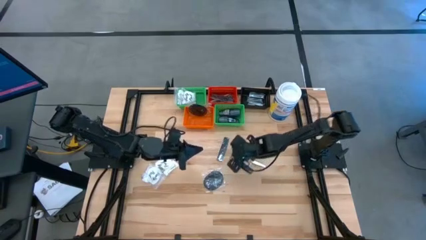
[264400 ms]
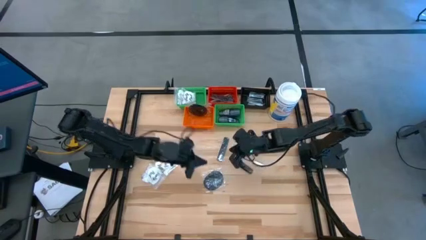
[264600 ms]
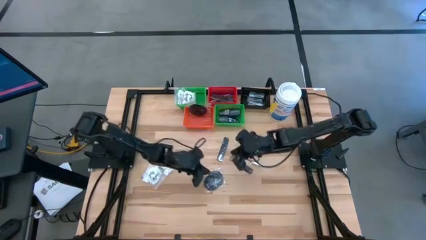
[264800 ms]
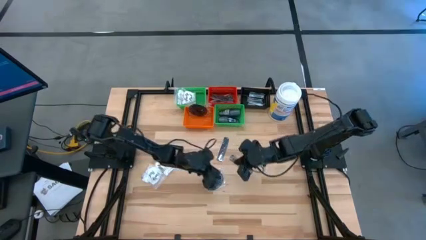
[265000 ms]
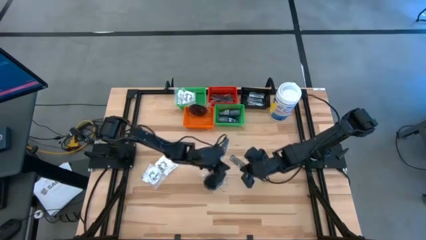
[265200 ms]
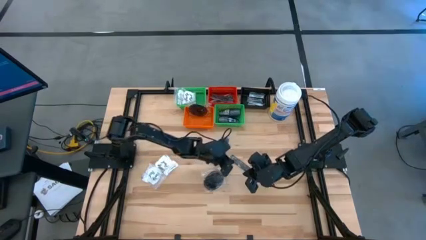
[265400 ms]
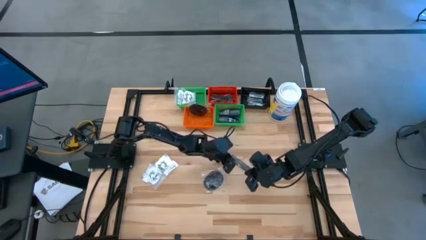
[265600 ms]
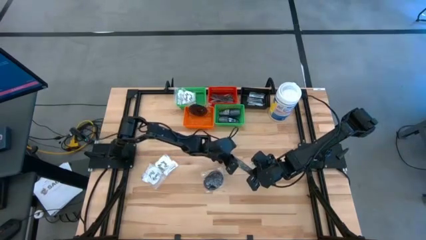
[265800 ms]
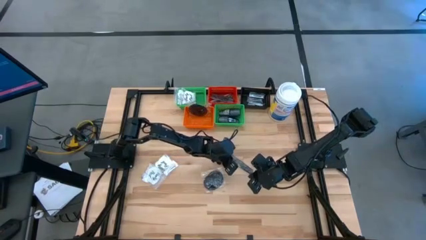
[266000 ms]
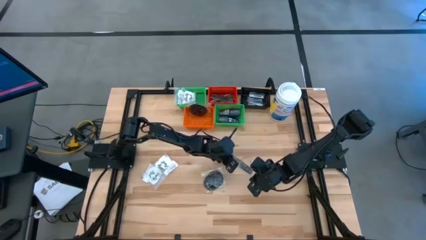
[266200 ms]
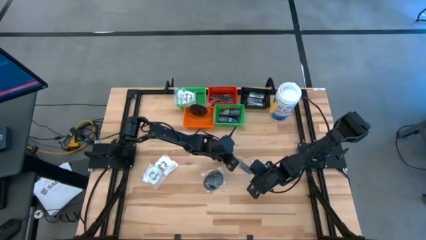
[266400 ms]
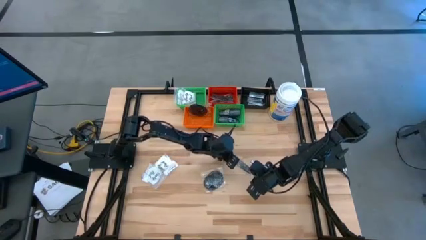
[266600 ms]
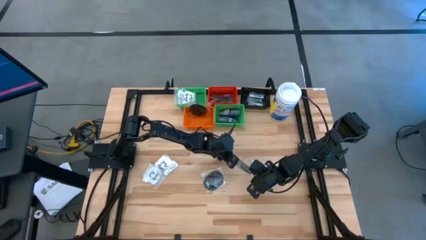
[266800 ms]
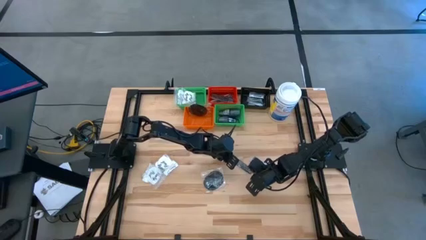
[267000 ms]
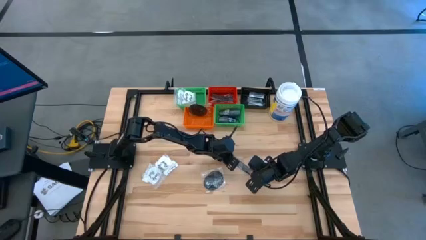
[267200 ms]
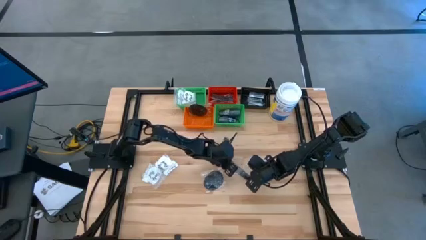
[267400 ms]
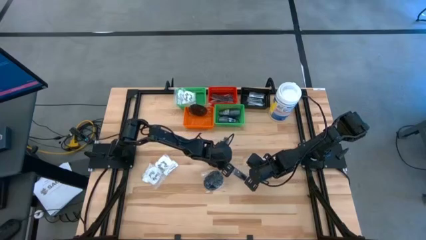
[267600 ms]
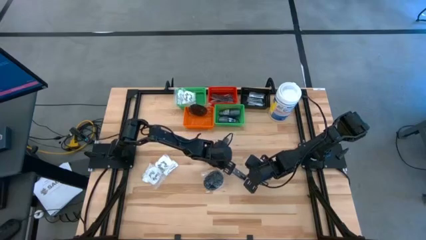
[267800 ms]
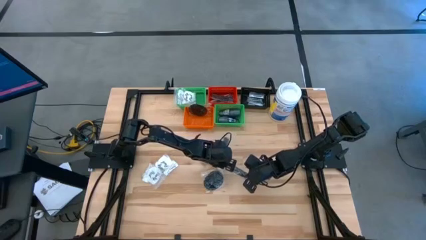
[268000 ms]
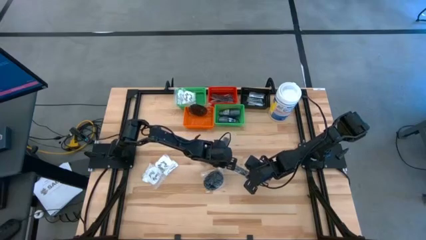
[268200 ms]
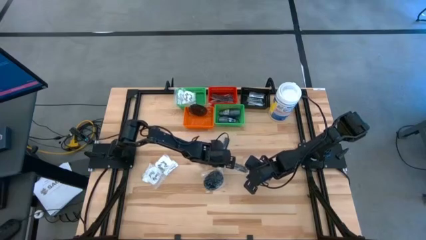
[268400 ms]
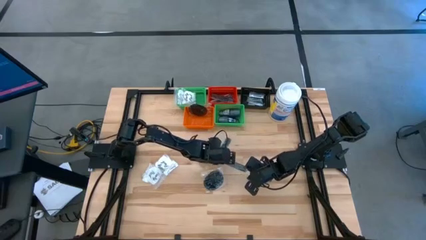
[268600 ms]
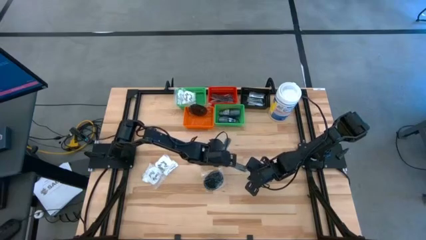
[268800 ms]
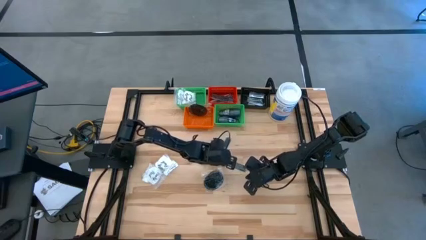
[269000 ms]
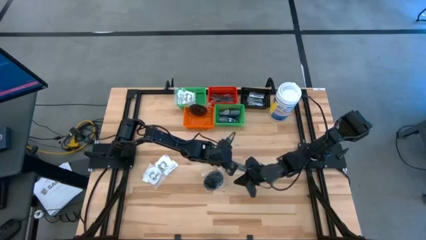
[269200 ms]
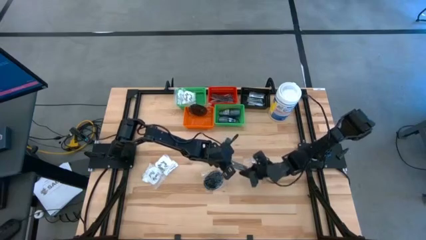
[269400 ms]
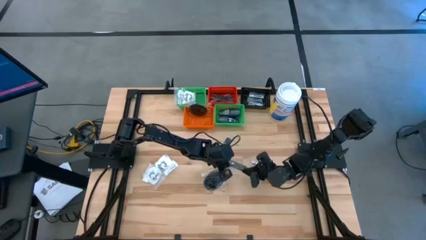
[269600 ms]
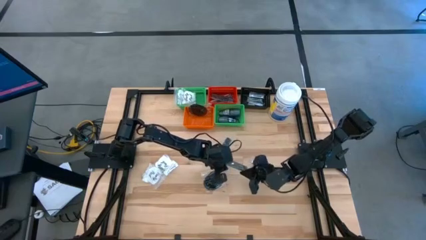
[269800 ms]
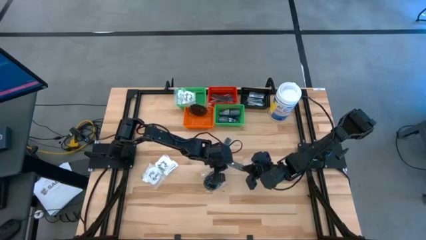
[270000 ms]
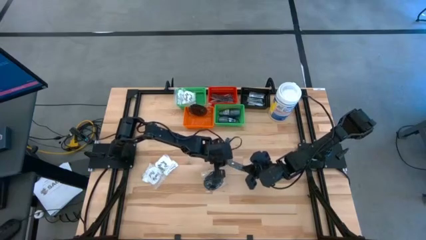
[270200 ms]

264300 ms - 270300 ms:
Task: Pick & Place Travel size toiletries
Adjust the black comb

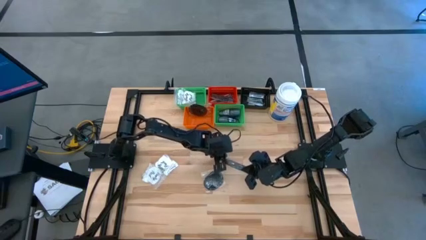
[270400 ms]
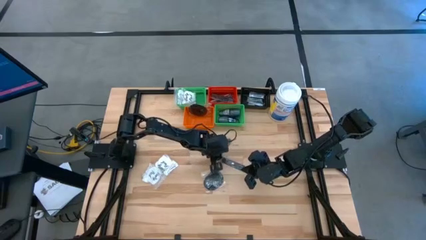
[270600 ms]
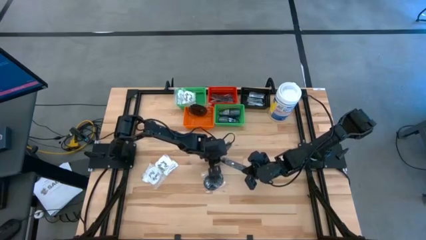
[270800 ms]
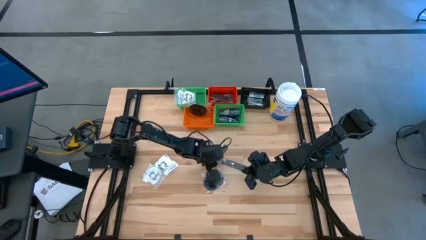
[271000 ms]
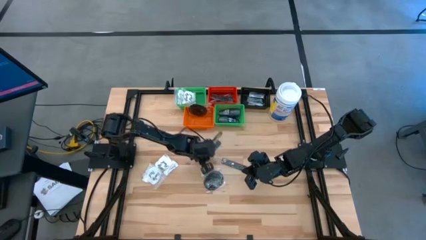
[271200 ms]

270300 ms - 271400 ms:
Adjust the black comb

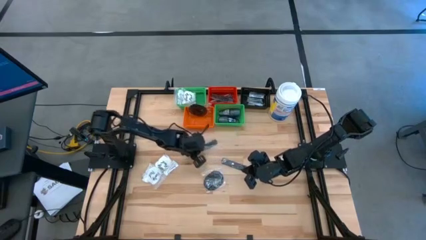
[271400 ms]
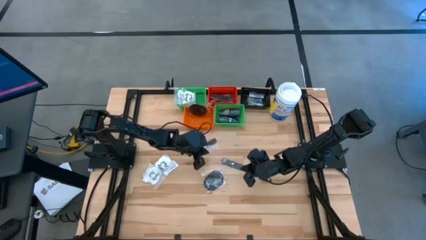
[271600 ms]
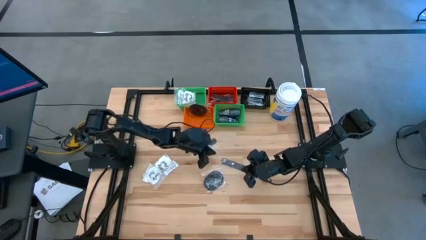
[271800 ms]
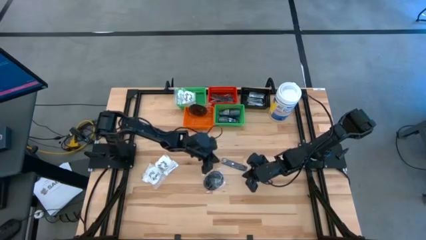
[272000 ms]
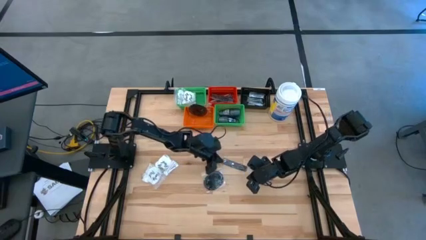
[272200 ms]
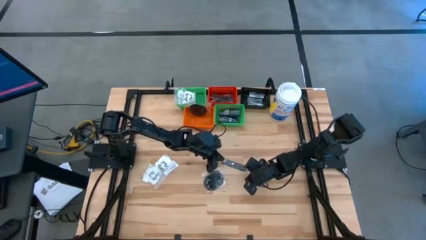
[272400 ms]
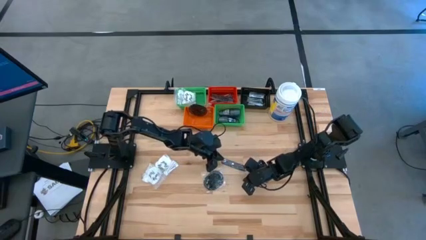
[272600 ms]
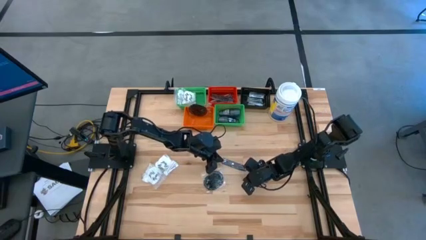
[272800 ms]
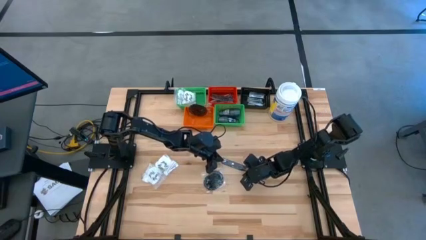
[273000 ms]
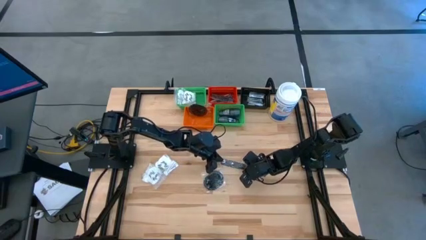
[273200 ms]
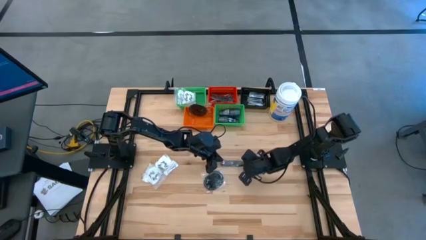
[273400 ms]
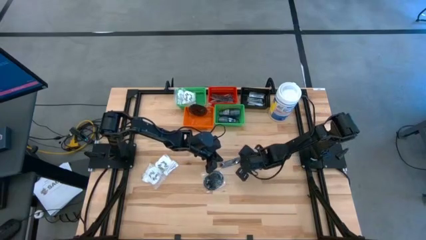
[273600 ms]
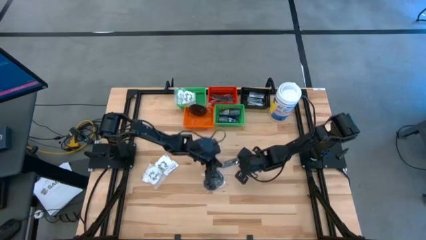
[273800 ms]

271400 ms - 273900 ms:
Adjust the black comb

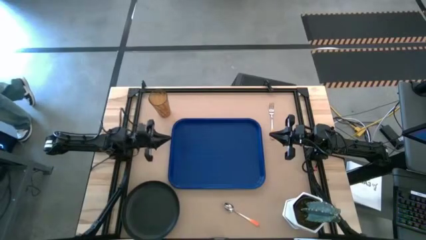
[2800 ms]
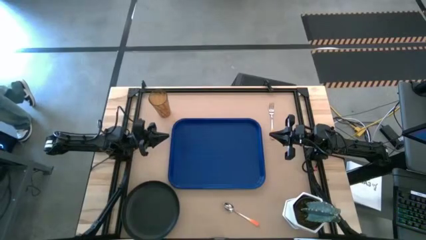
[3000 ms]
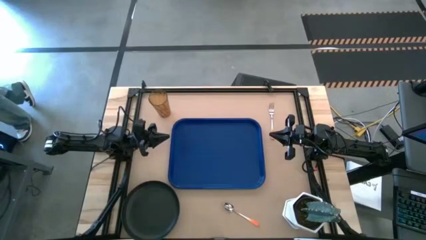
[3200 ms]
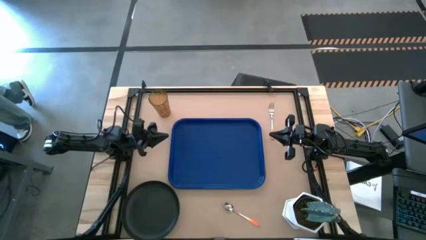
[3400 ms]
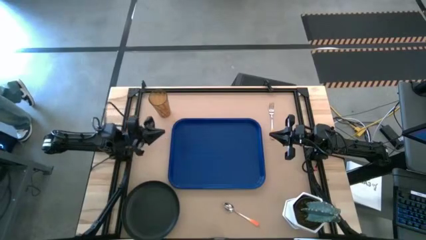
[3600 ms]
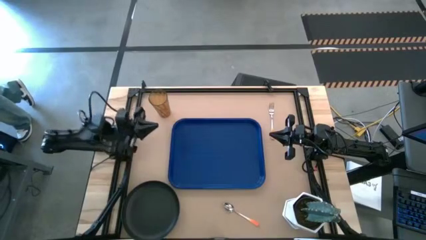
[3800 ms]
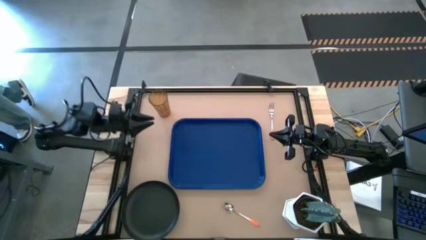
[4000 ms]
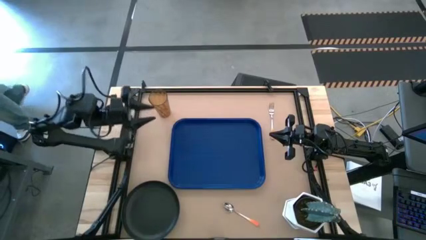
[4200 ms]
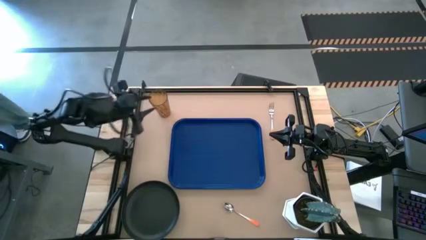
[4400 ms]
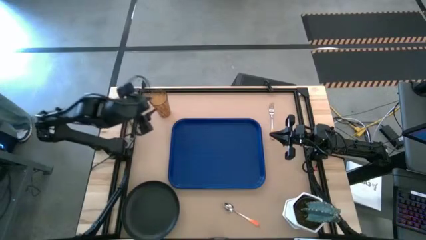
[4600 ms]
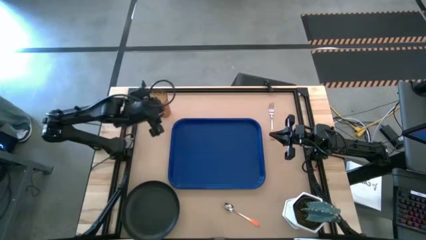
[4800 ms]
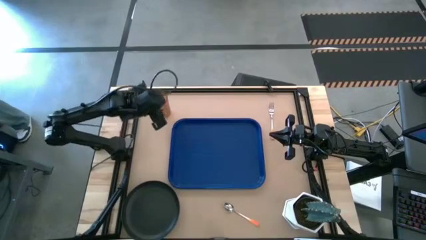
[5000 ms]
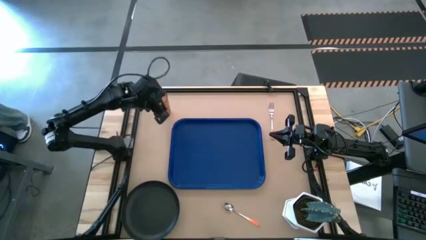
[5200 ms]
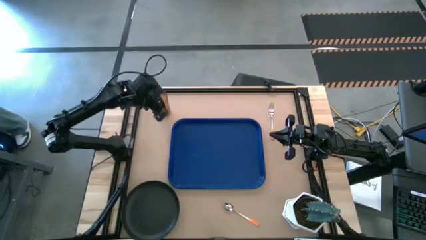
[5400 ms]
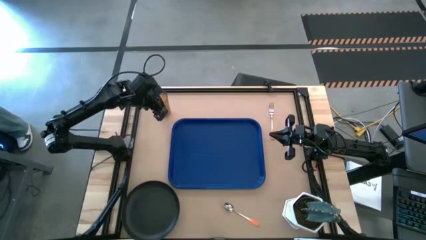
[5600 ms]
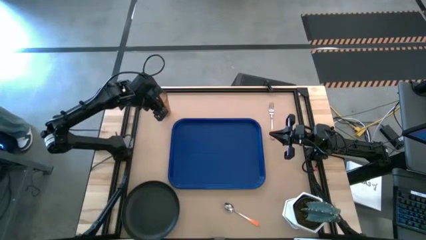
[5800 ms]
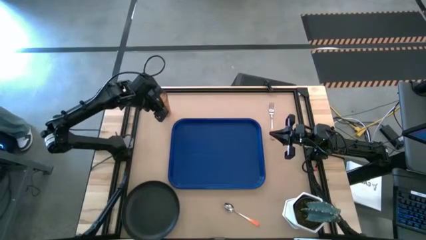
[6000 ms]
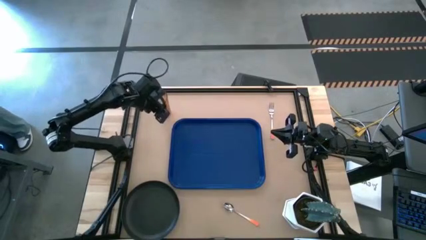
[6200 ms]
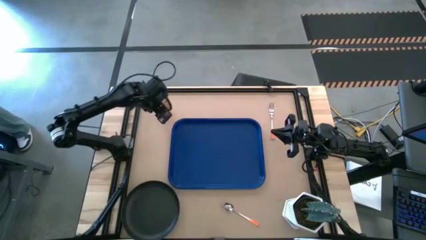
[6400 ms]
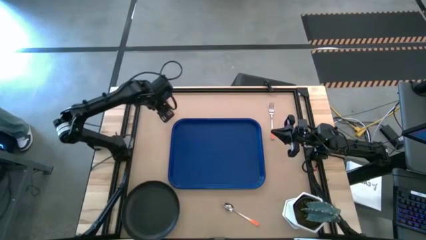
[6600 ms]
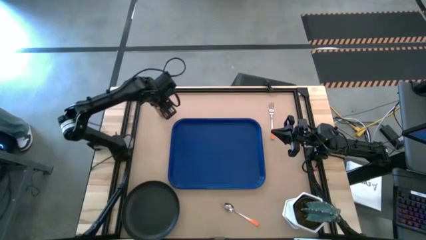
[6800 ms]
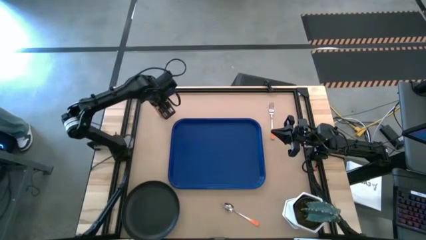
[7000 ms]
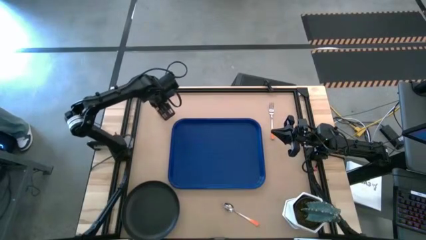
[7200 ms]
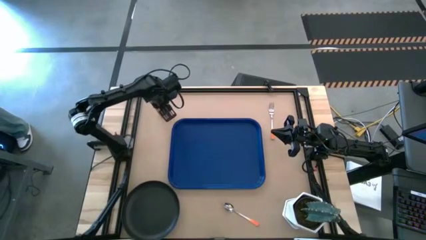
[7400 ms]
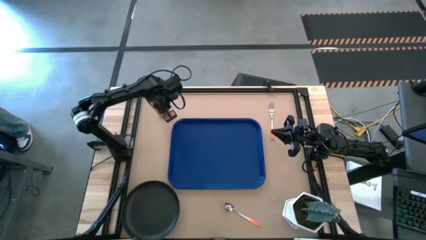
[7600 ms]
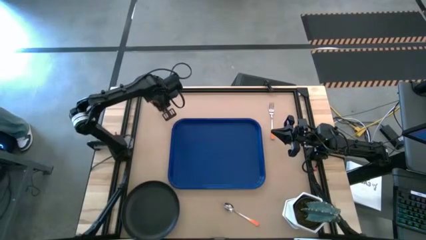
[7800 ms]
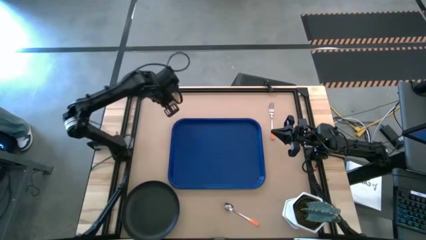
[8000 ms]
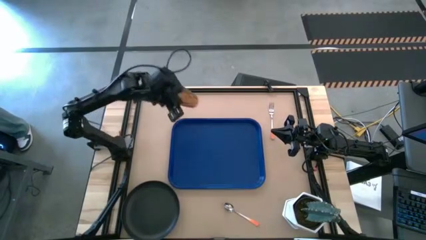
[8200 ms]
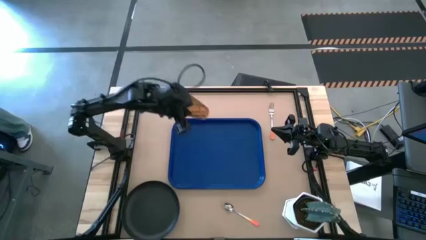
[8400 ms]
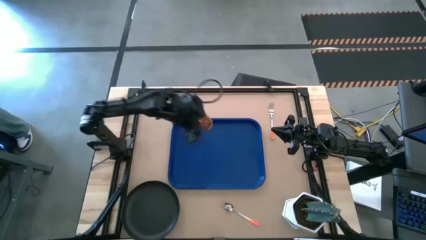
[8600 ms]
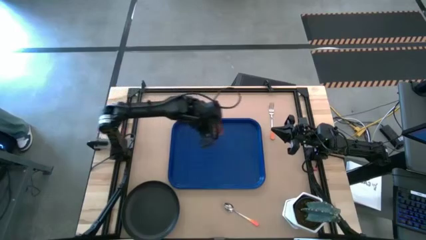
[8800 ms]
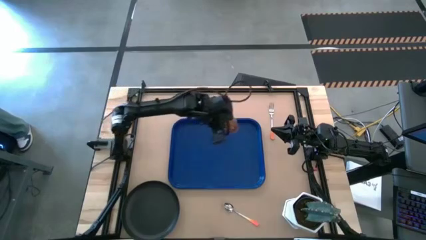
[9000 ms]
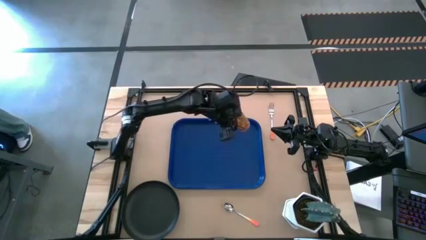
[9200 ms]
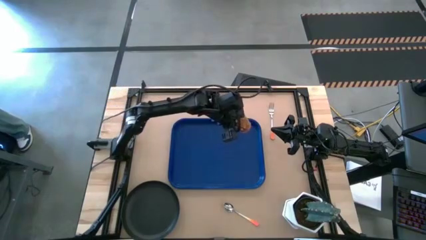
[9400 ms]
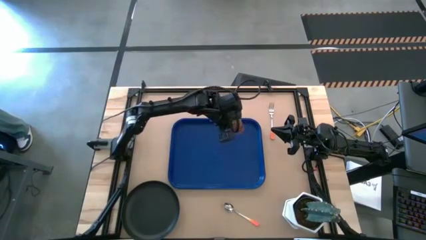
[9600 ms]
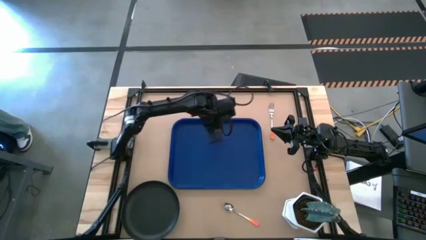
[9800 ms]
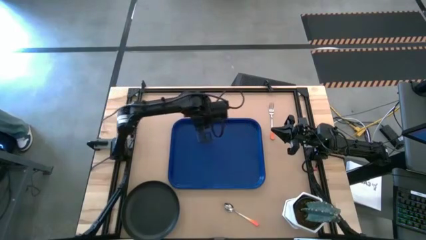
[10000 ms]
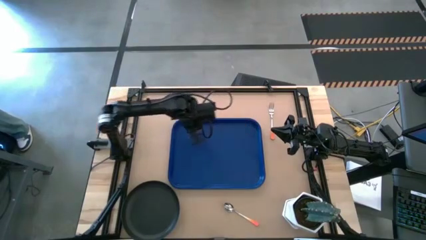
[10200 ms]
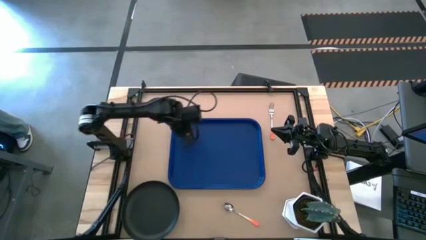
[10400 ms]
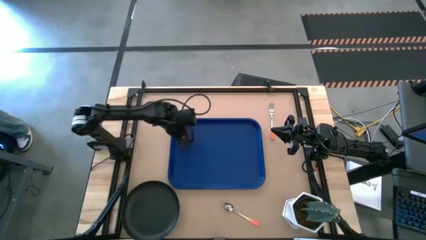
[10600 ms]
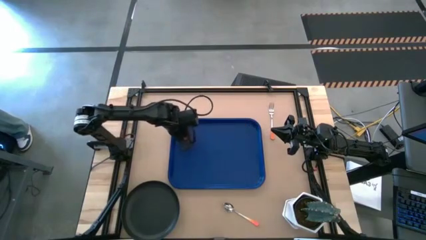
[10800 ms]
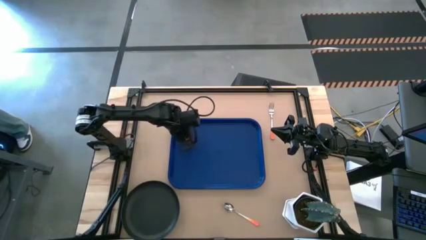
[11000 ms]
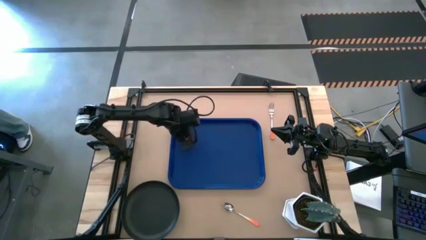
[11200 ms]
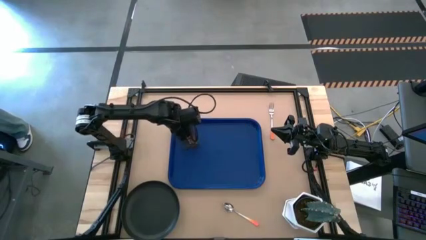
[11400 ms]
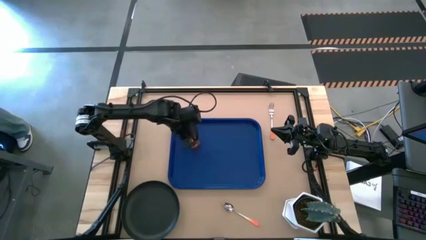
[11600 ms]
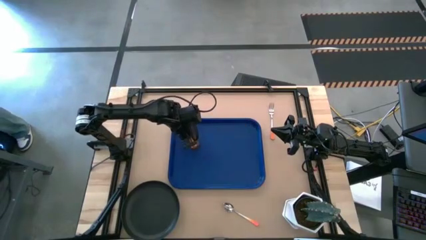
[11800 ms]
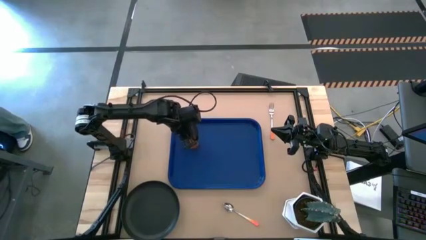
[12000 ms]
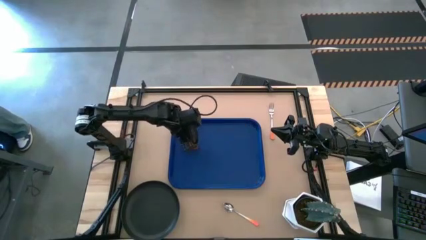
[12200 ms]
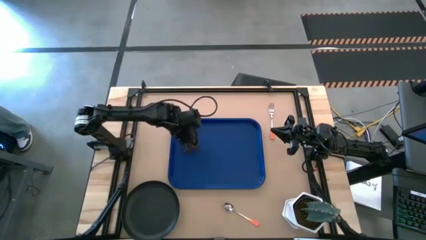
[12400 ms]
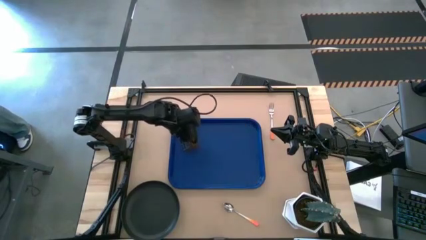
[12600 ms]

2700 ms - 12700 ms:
Task: Pick and place plate/cup/fork/spoon on tray
Put the glass cup on the blue tray
